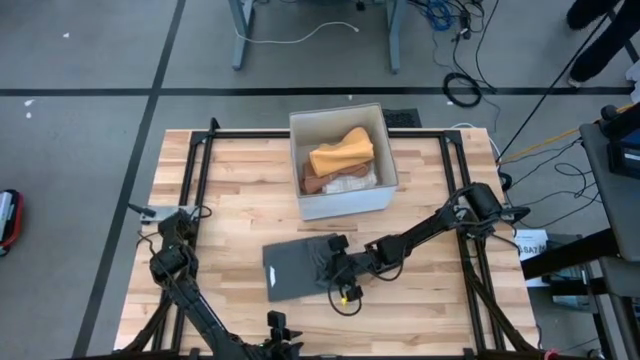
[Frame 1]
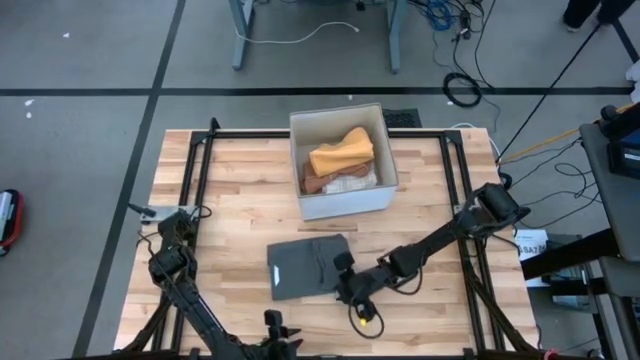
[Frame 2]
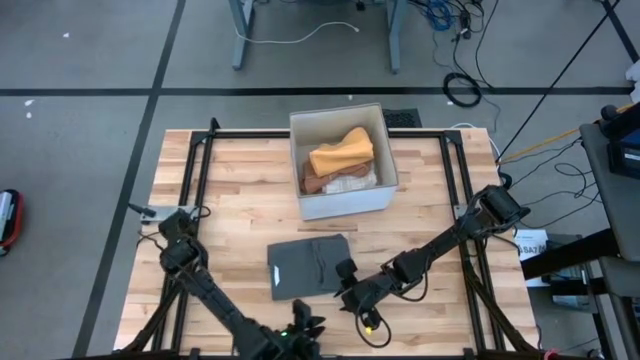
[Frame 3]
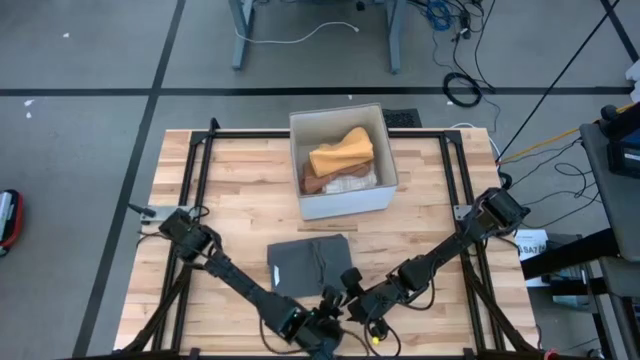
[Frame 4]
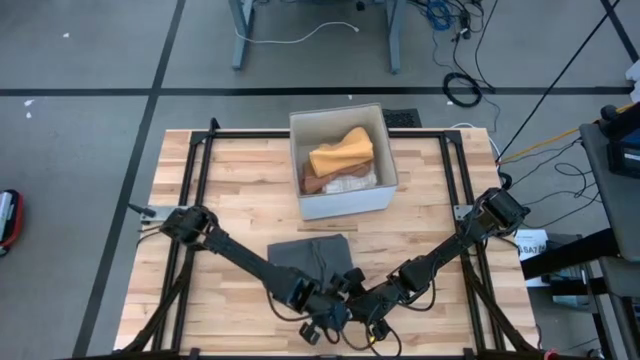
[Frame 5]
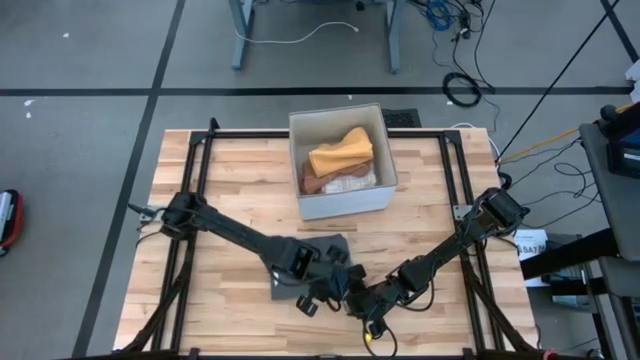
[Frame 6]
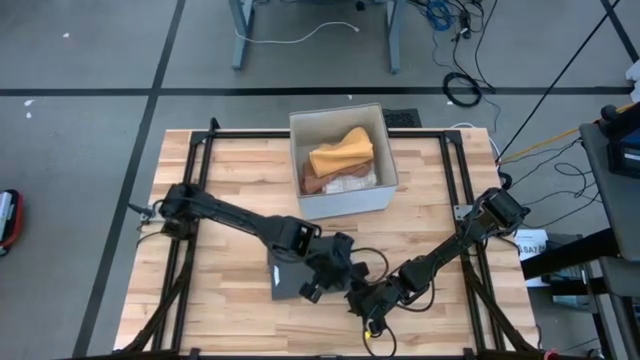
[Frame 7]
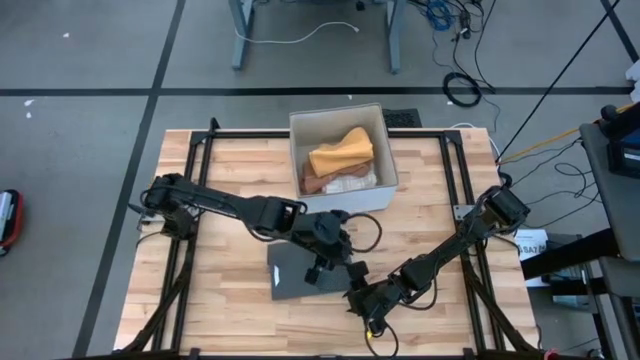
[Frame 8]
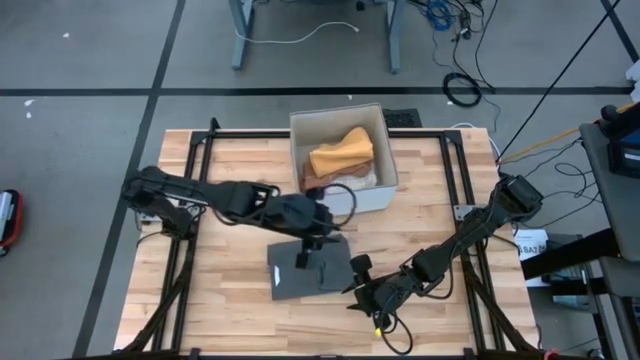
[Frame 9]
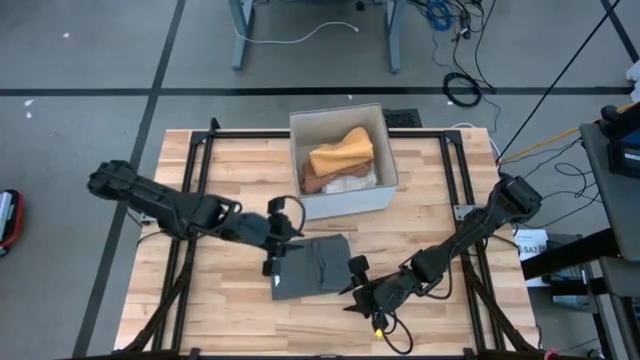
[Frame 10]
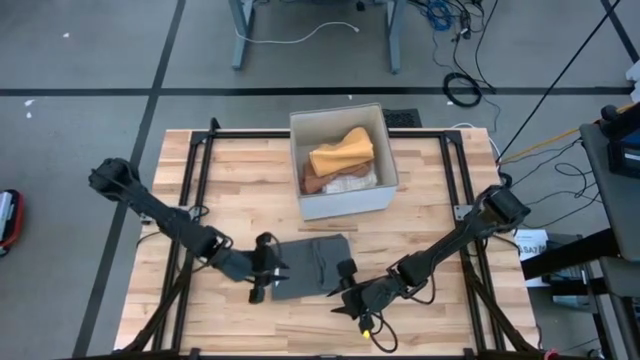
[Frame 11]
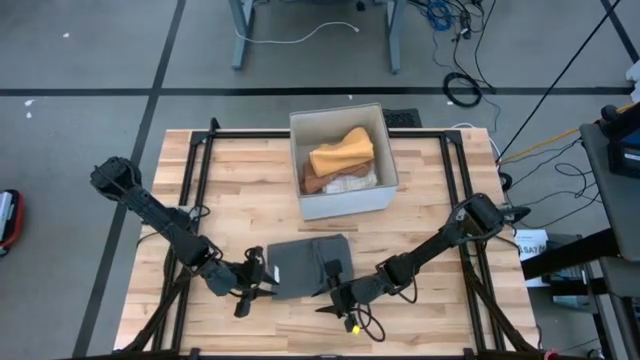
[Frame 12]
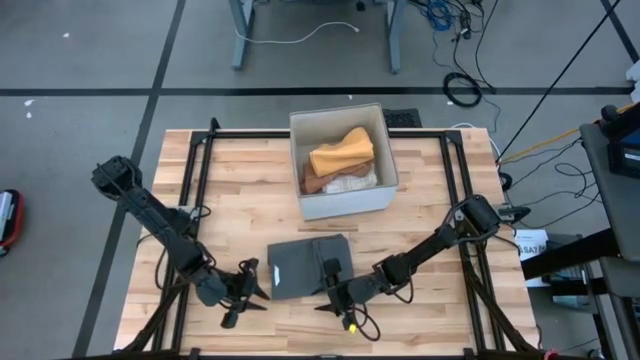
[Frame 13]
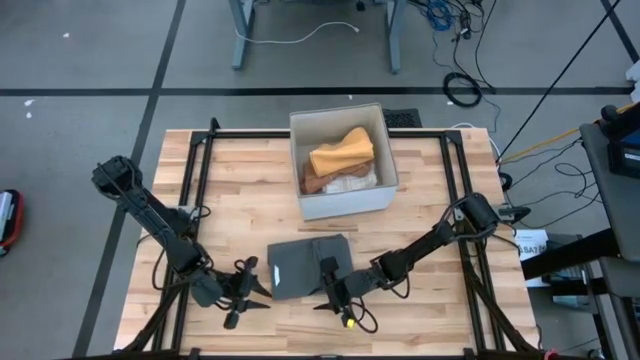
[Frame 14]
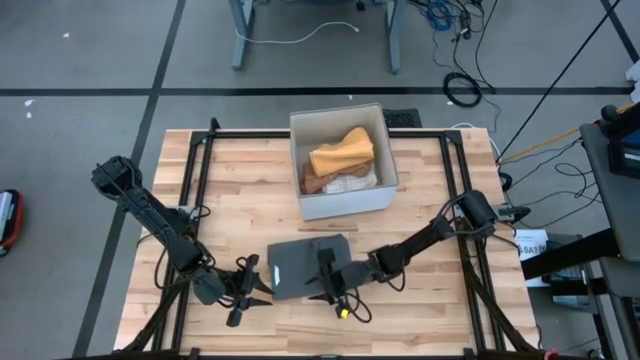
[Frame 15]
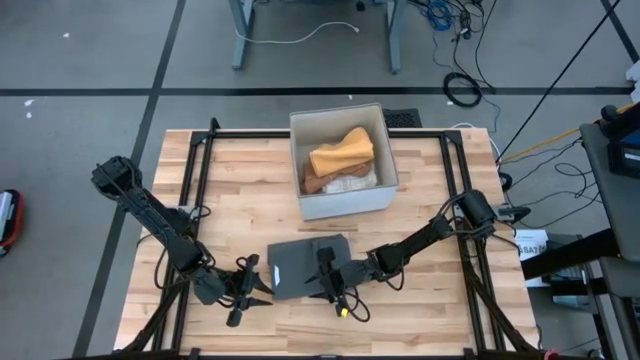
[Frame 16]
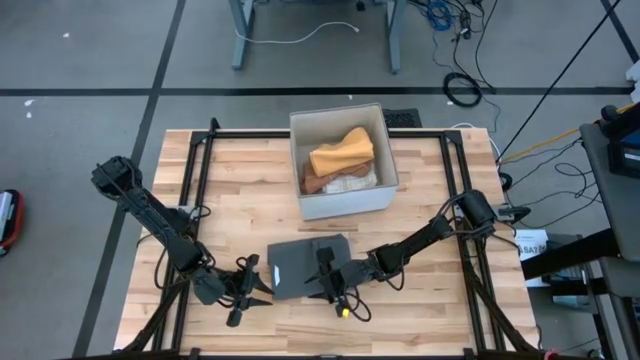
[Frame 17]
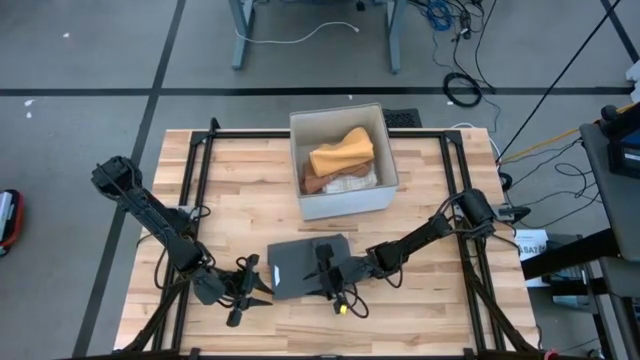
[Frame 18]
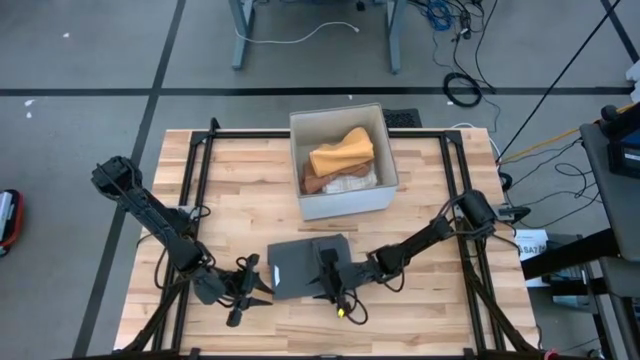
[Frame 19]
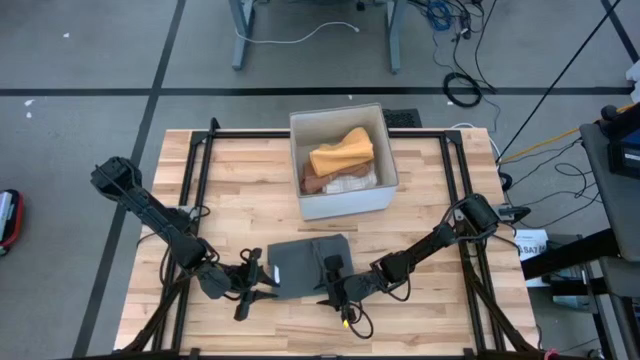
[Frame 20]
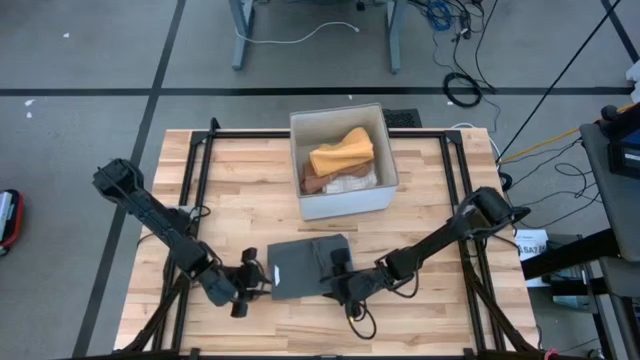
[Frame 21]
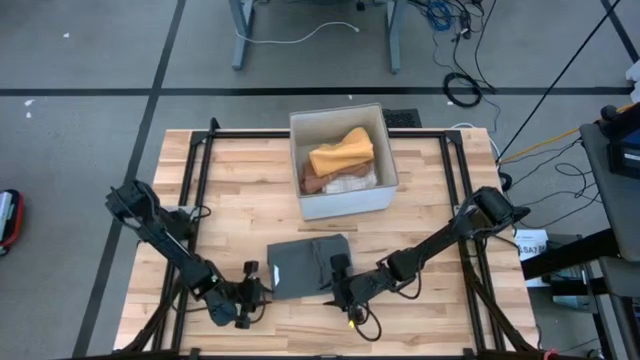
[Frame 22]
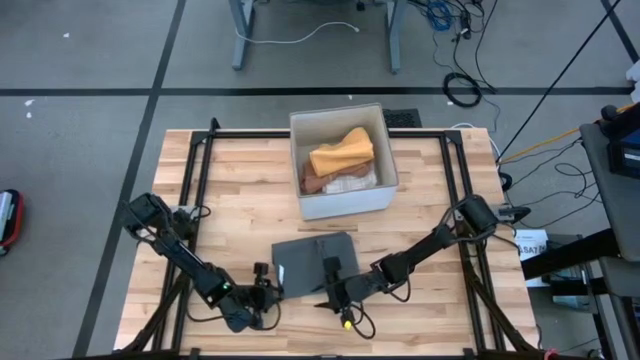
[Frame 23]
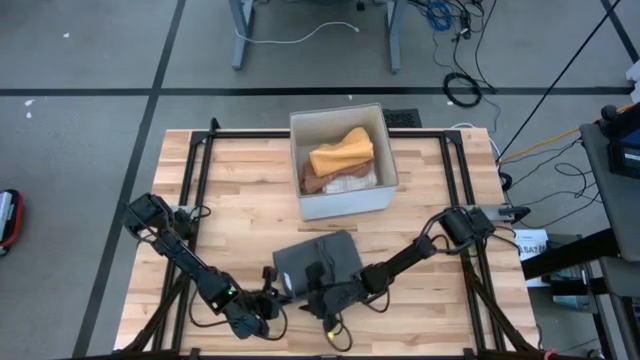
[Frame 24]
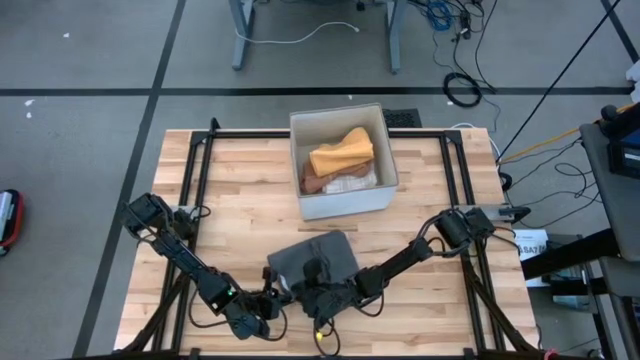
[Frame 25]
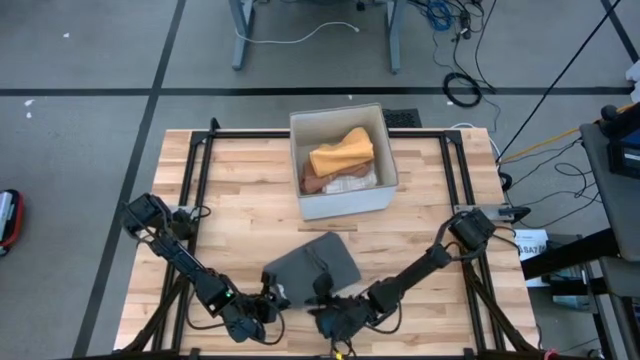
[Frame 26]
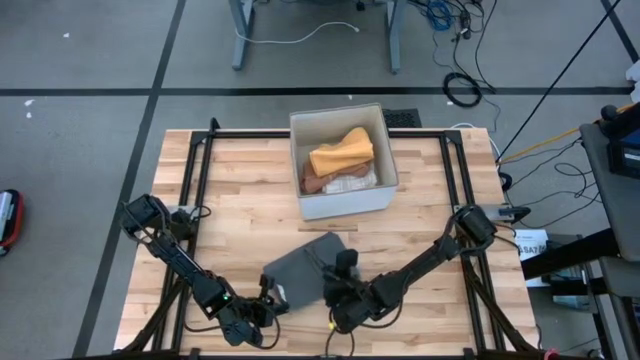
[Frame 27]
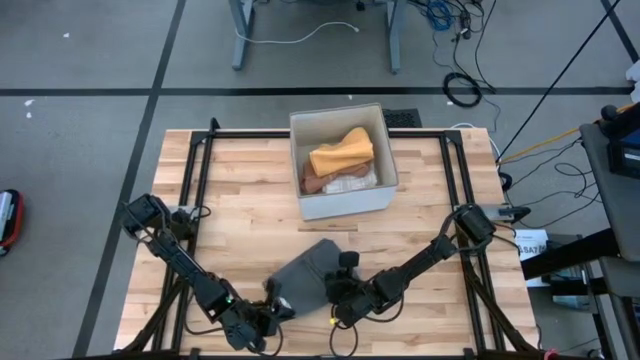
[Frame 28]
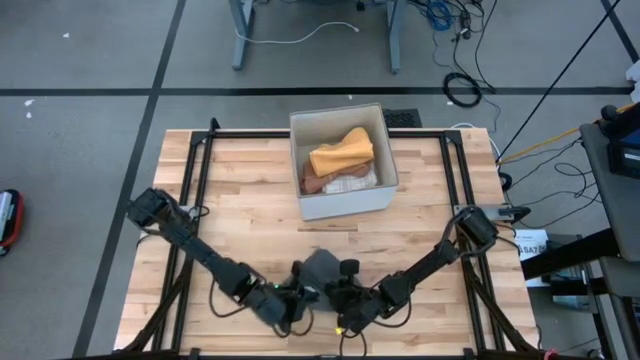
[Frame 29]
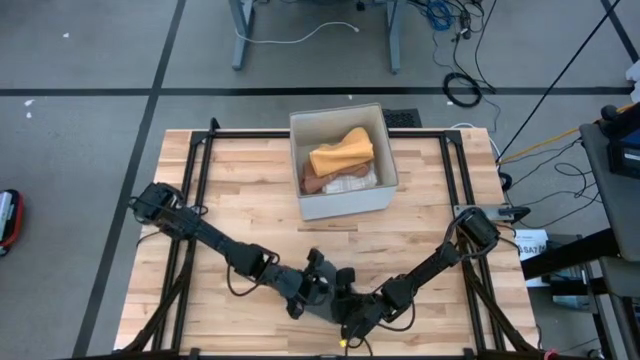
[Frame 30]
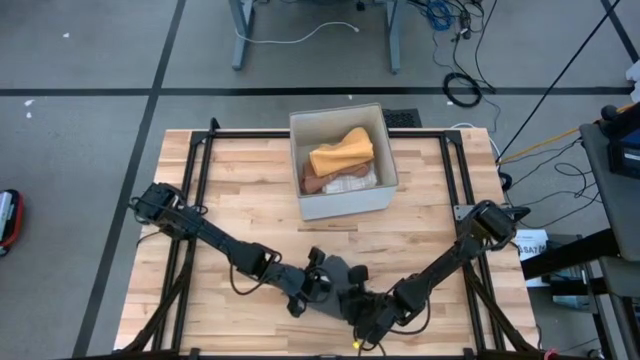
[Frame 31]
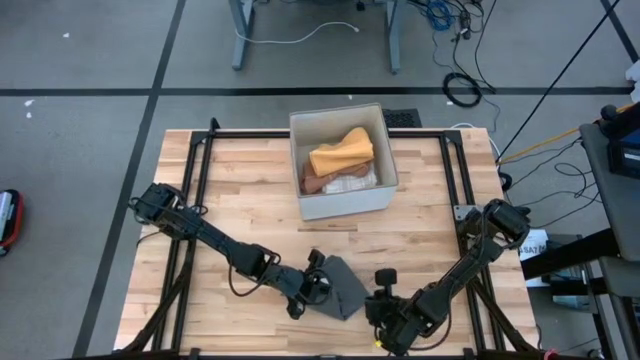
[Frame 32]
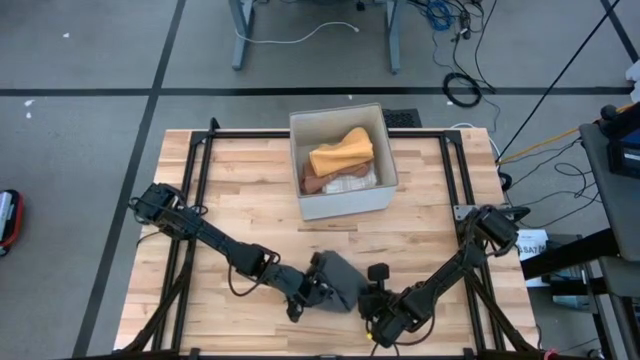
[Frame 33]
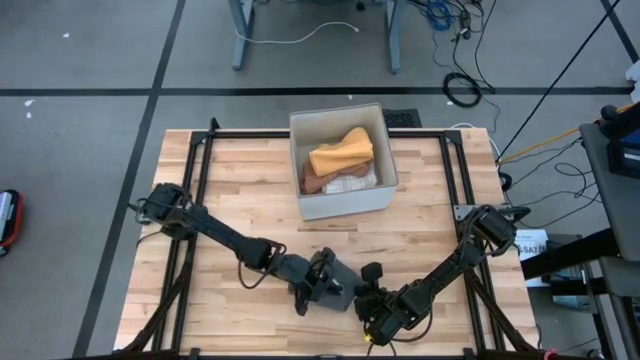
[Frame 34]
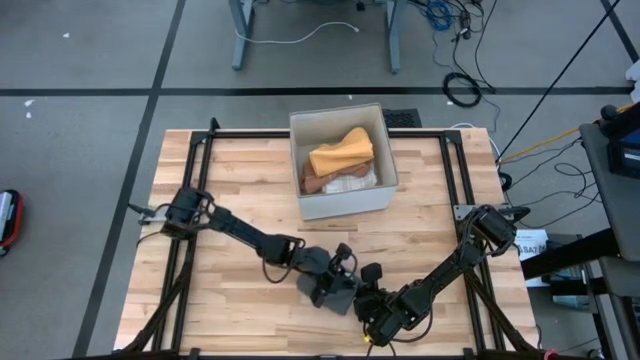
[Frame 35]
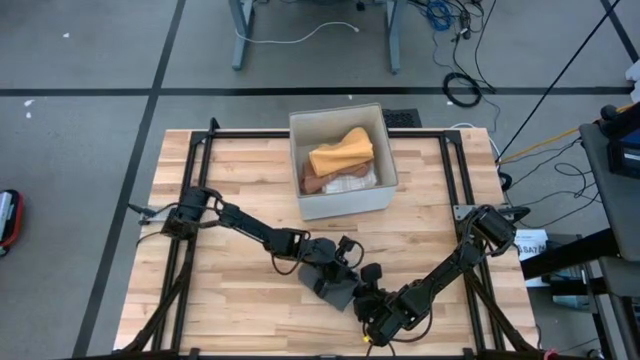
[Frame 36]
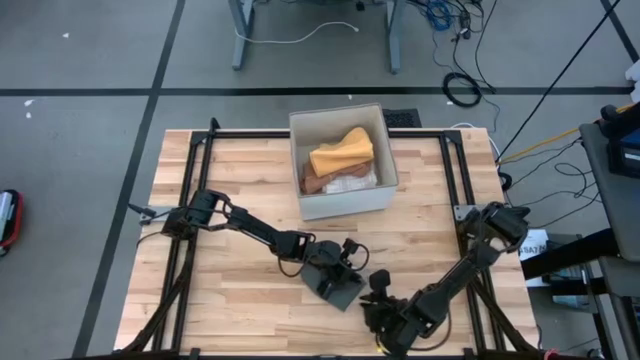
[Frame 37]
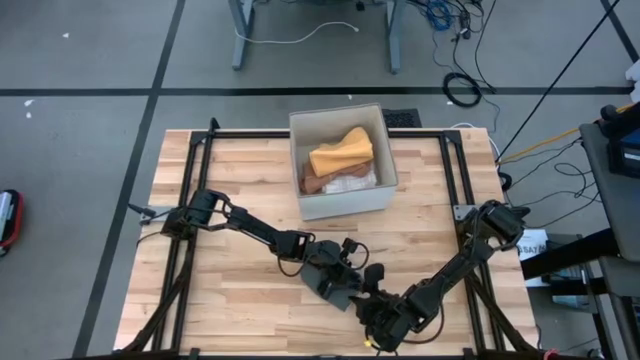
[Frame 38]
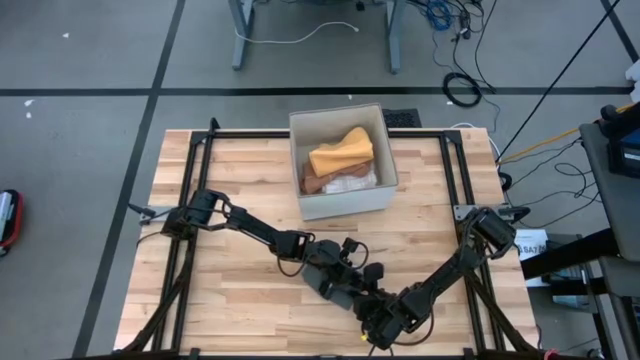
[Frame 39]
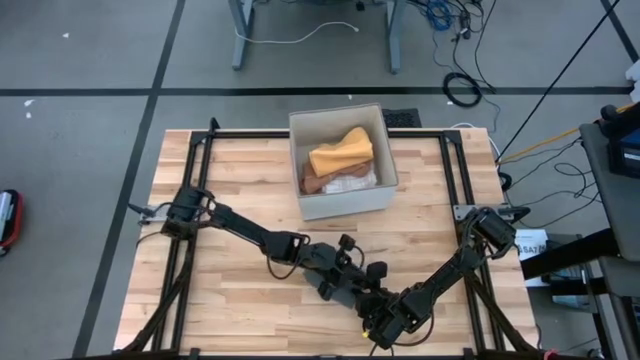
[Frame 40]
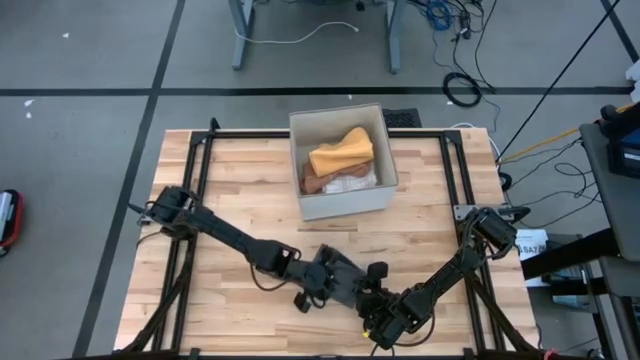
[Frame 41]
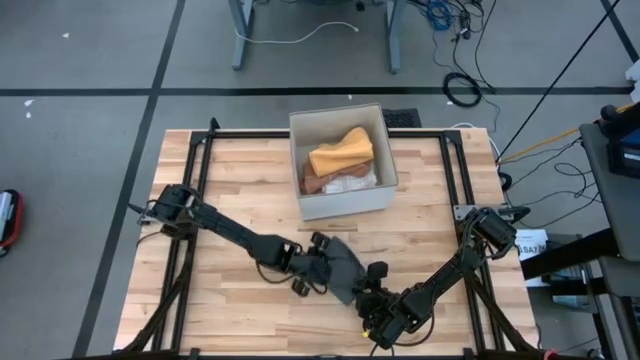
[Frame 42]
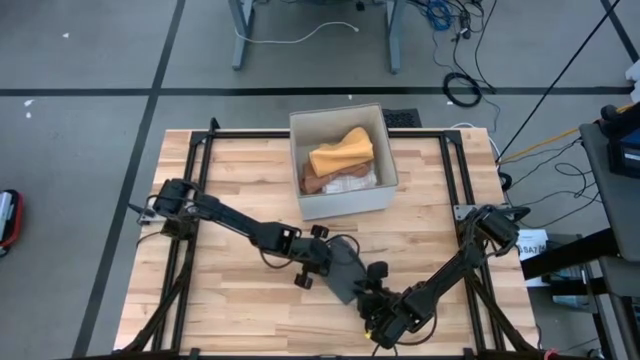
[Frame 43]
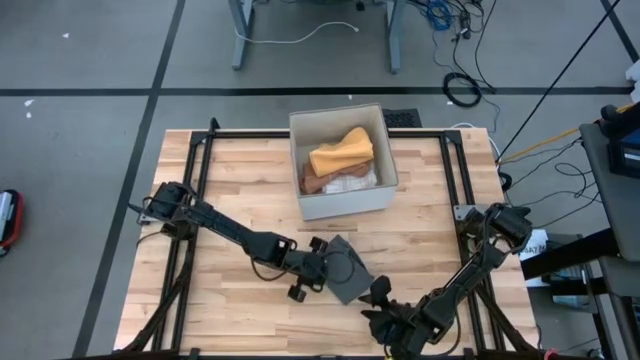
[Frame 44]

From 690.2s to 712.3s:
Task: Fold towel
Fold the orange towel
